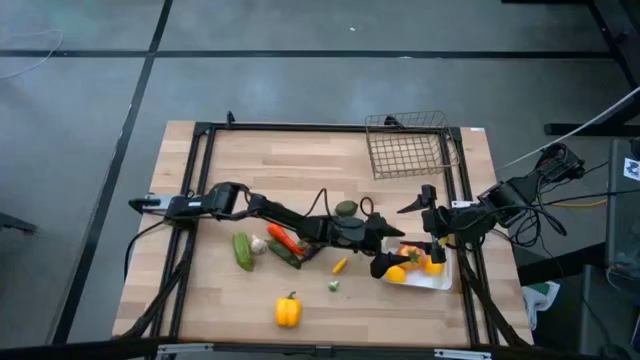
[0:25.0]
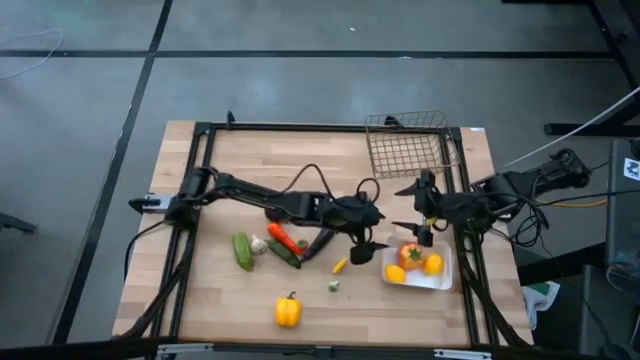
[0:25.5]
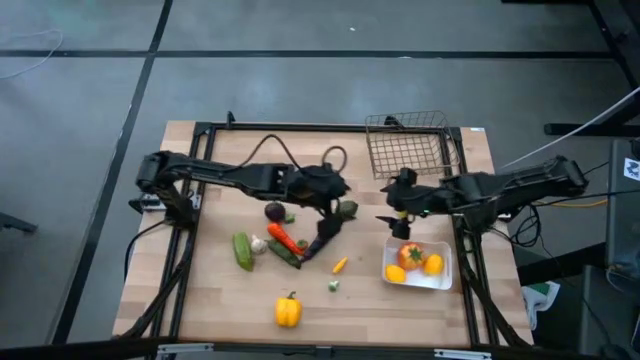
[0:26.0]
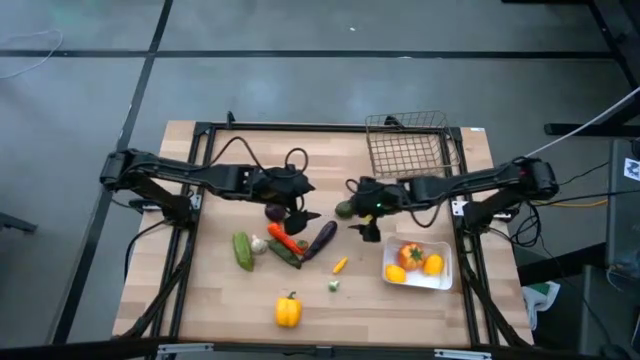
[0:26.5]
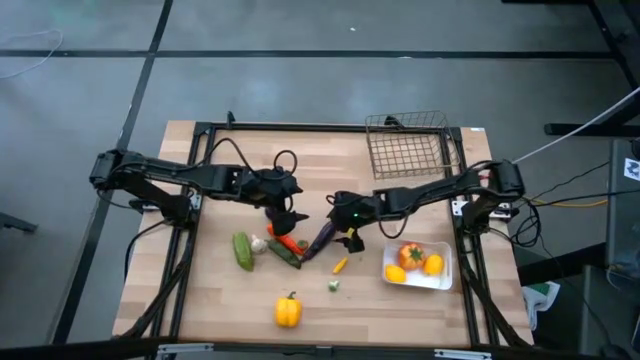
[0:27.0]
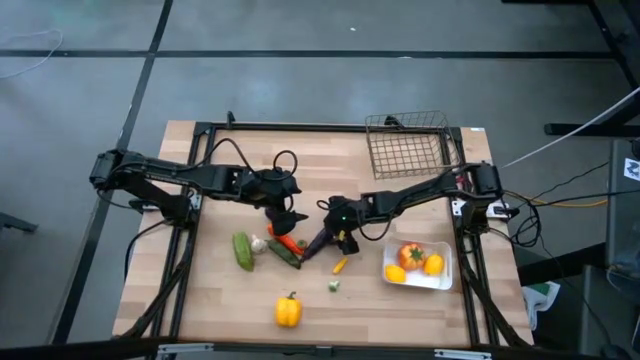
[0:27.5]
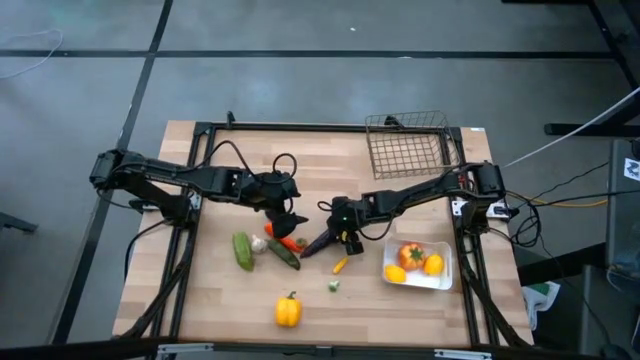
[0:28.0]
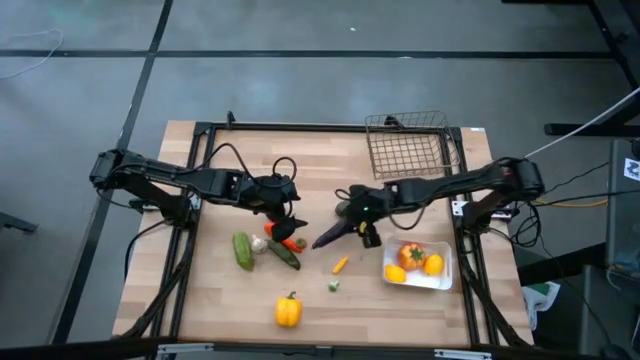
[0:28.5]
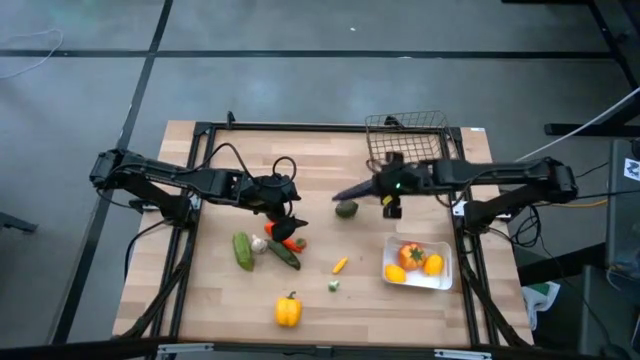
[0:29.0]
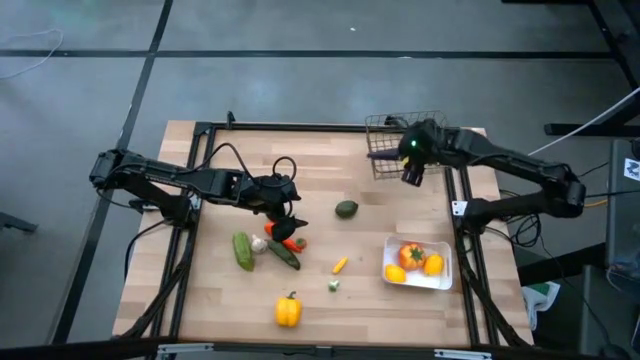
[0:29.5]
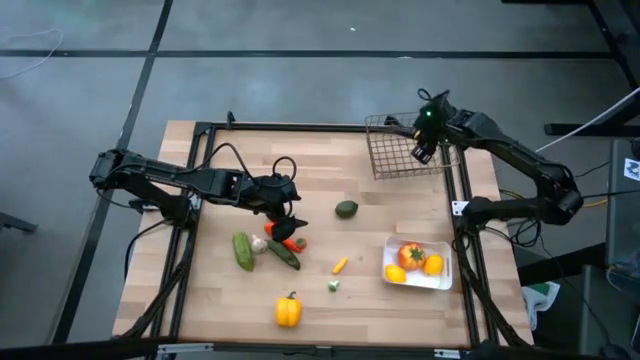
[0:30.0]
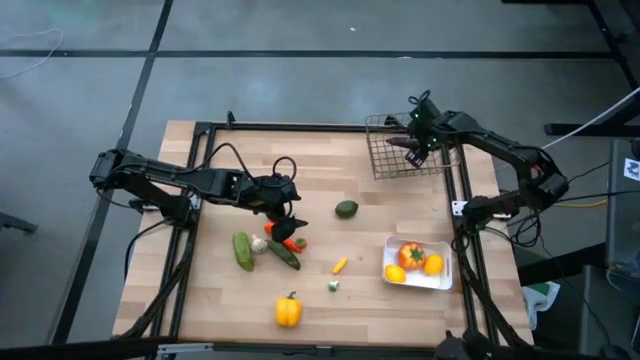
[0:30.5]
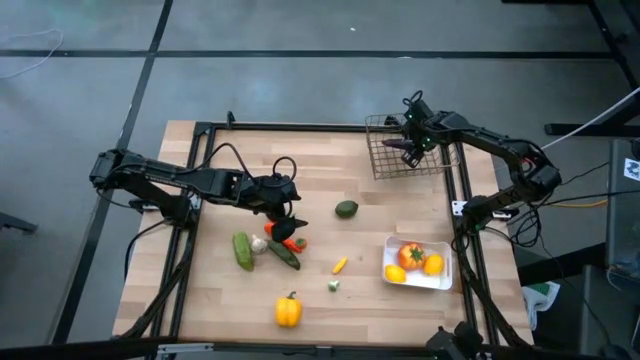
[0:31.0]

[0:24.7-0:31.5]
Task: Sort produce into baskets
Put the violet eggplant into the black wire basket

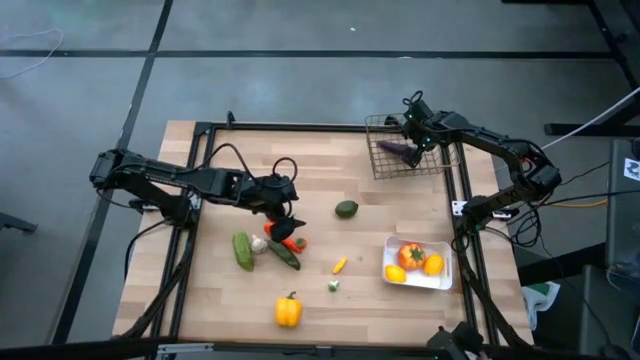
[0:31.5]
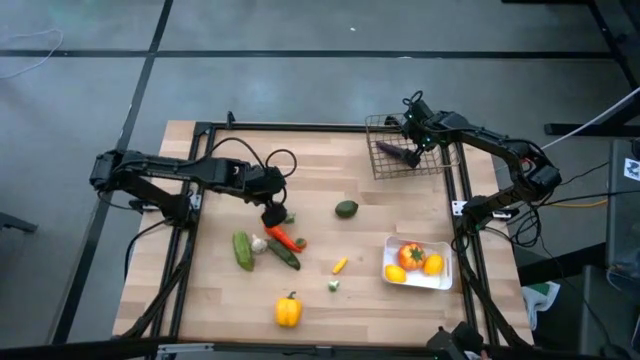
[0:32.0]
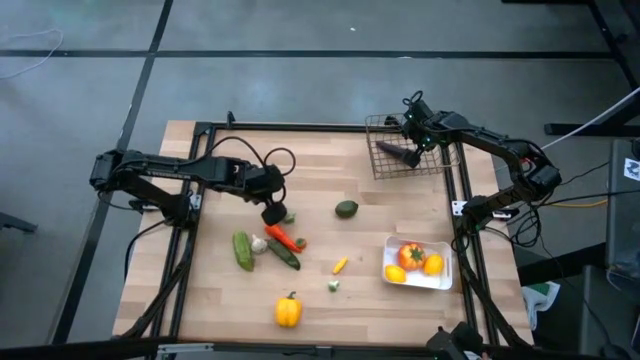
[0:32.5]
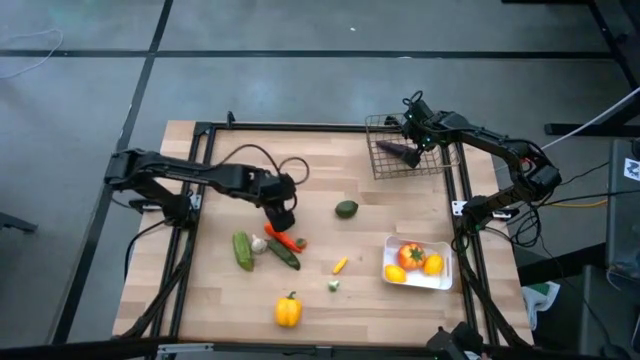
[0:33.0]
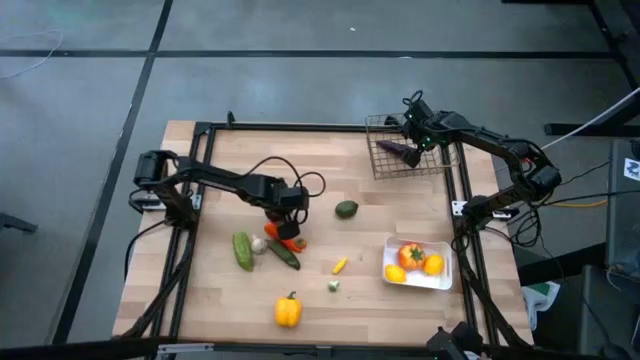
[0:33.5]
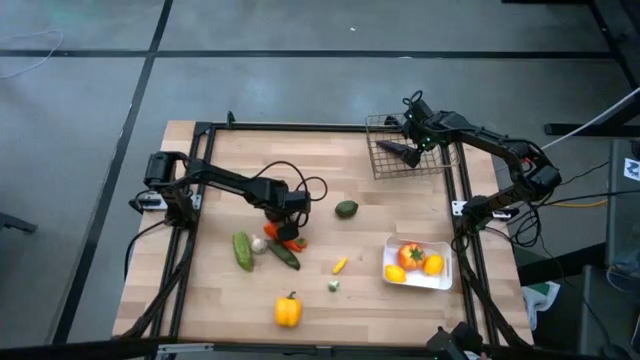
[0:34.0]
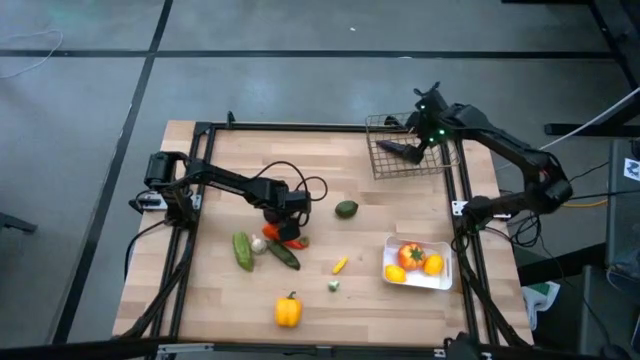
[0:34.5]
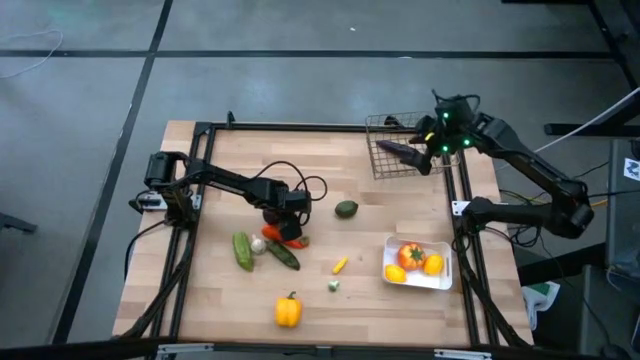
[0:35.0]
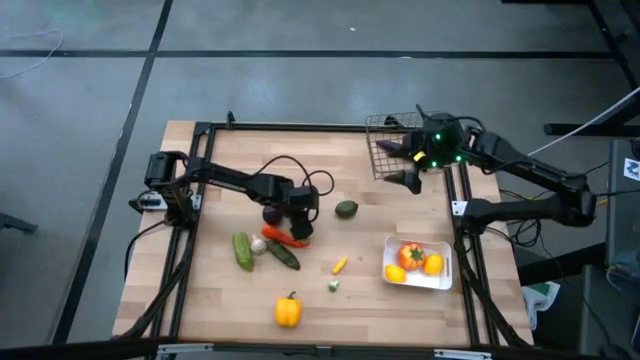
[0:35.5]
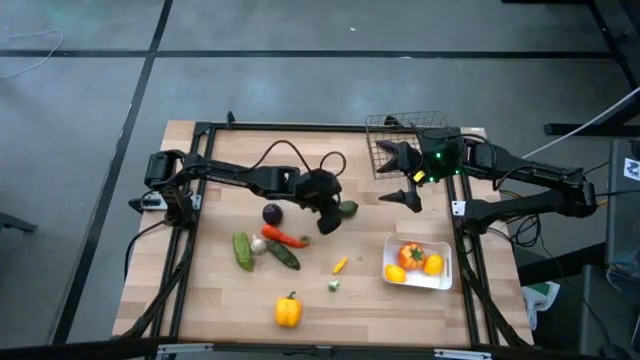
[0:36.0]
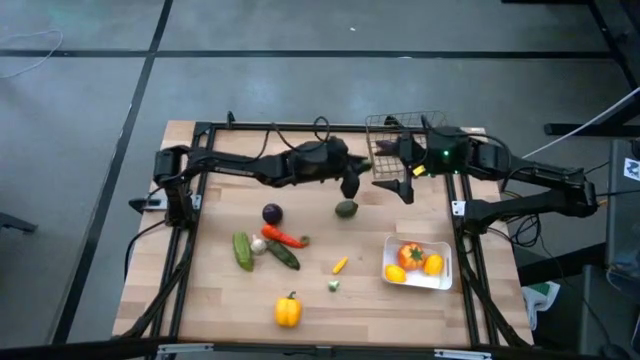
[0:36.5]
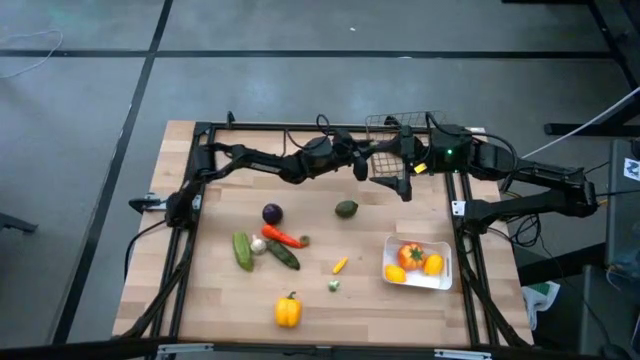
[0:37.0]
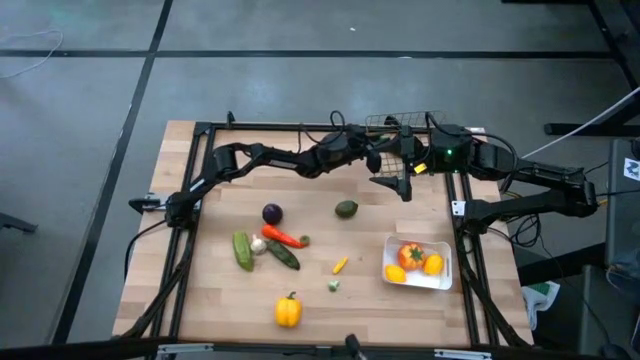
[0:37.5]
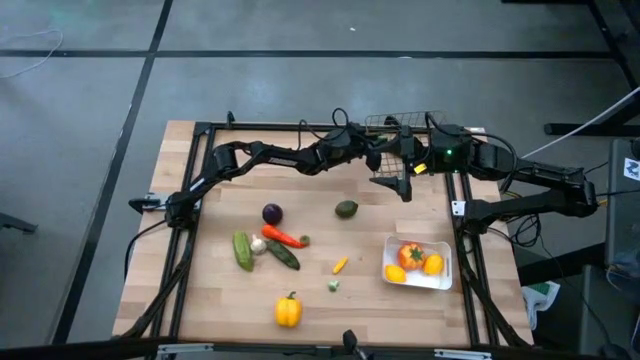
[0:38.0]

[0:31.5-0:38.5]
Put the top green chili pepper into the black wire basket

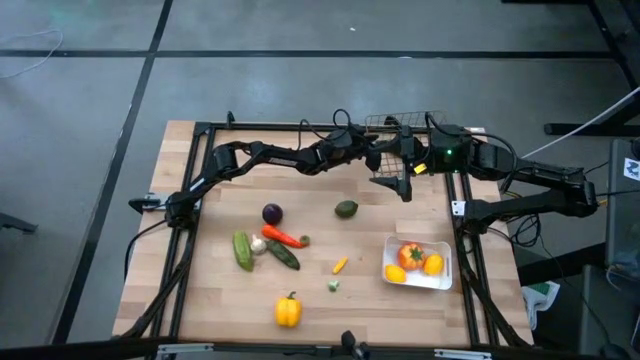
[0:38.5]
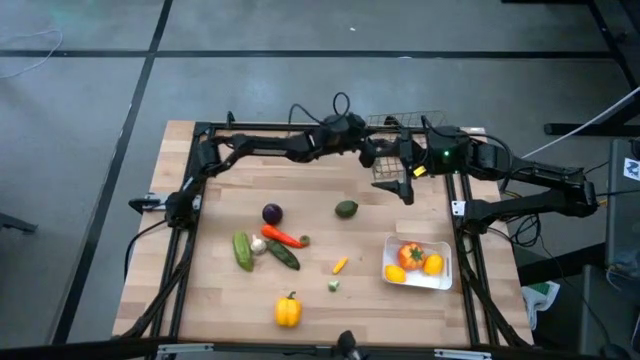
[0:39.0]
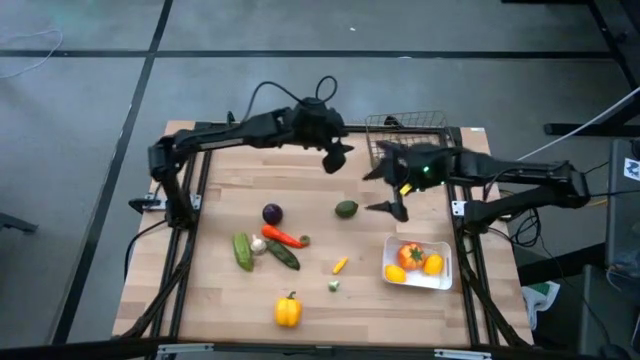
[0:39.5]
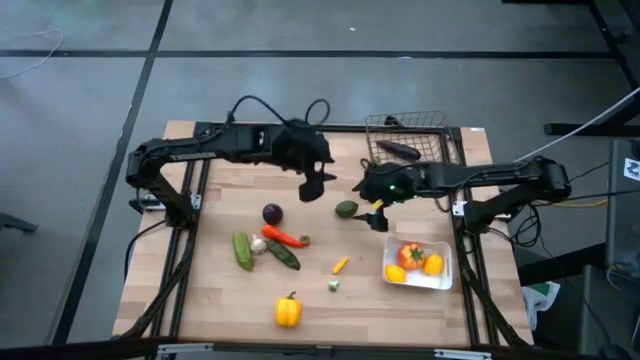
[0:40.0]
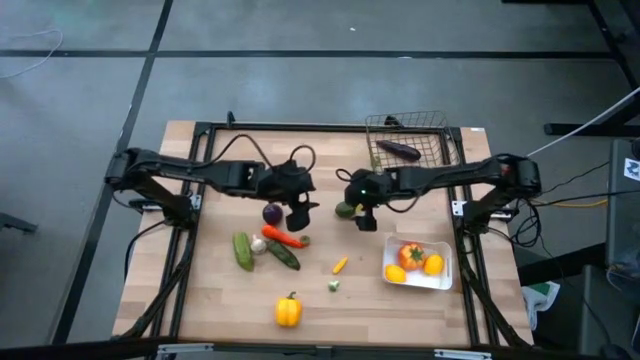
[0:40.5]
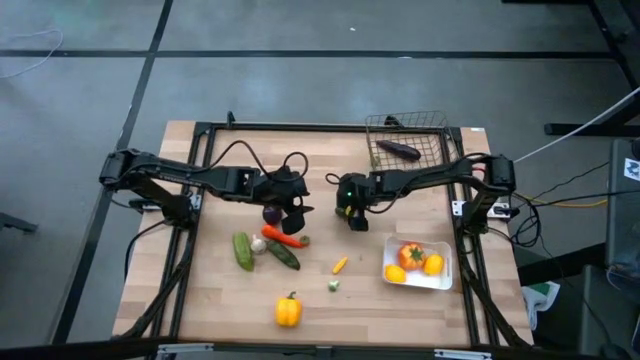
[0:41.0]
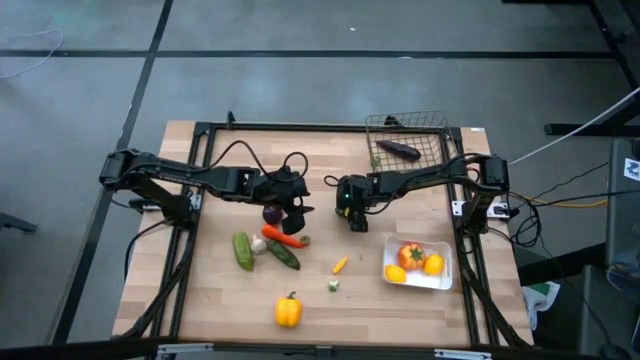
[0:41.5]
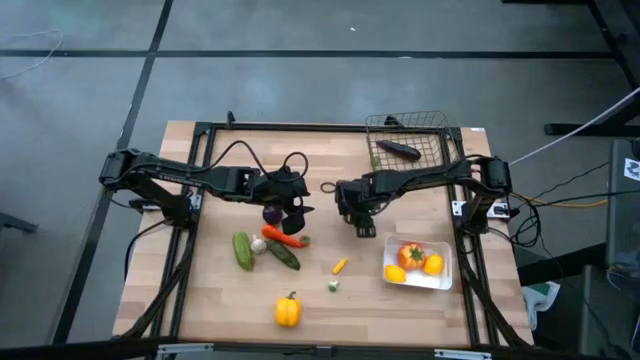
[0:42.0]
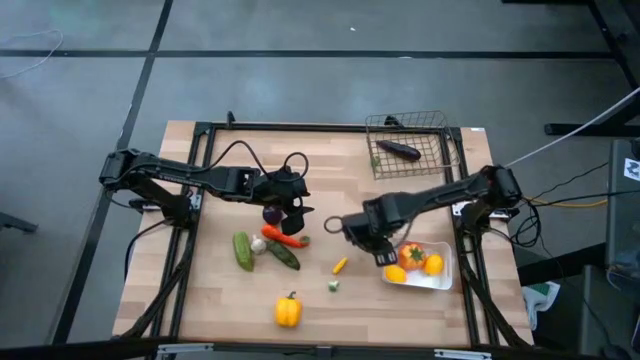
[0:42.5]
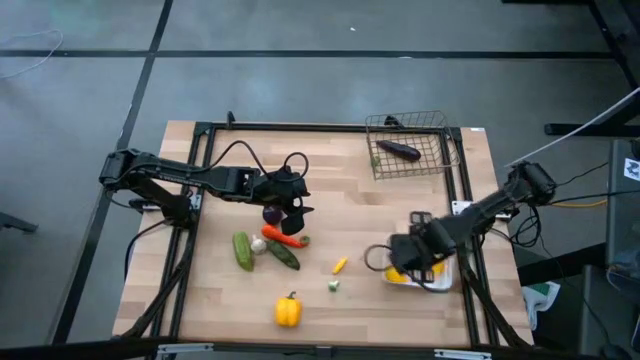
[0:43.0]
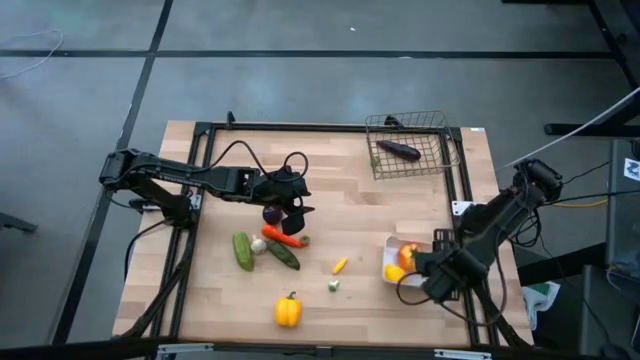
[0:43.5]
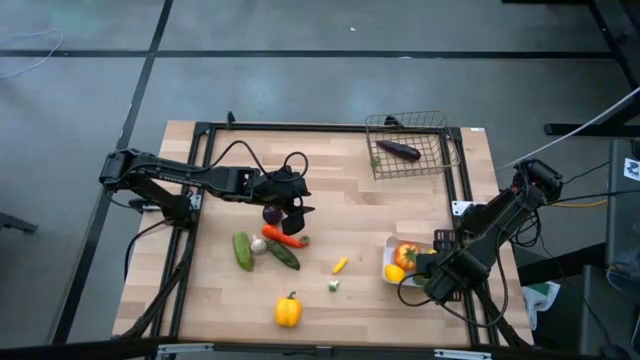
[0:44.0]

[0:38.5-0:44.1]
Put the green lime into the white bin

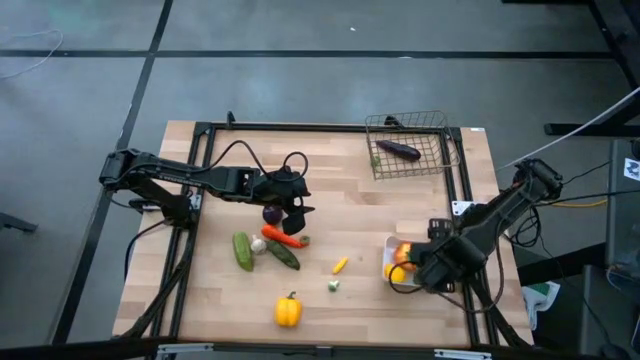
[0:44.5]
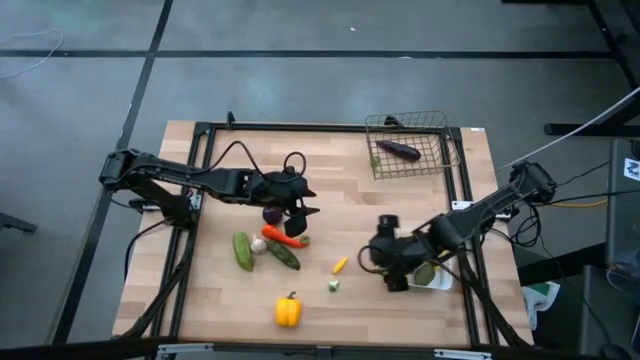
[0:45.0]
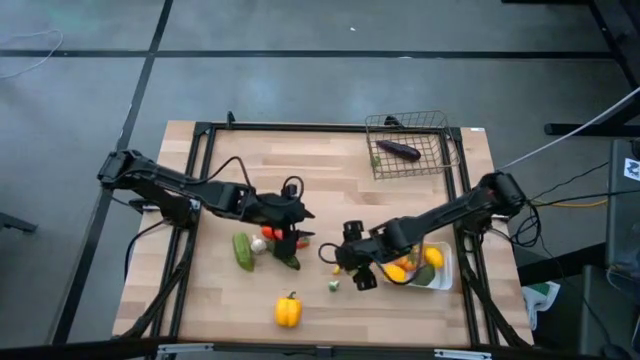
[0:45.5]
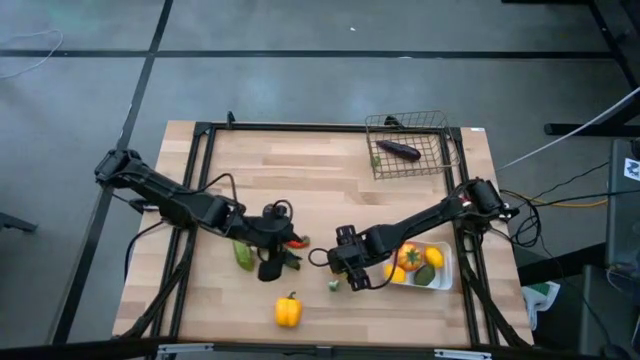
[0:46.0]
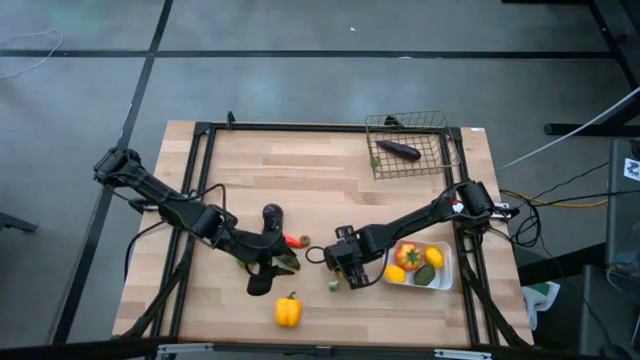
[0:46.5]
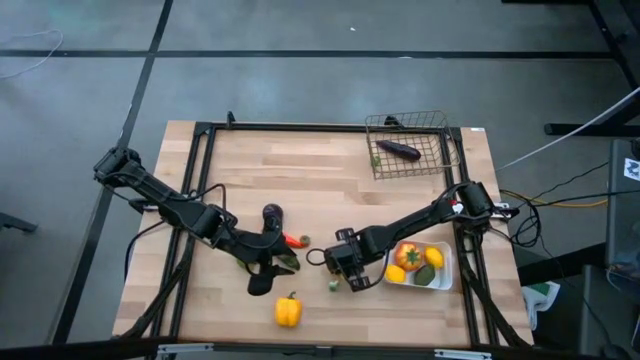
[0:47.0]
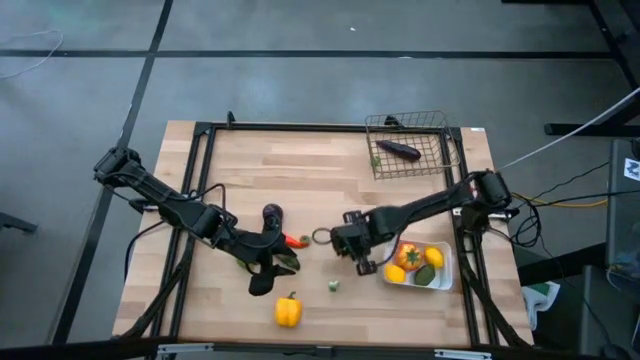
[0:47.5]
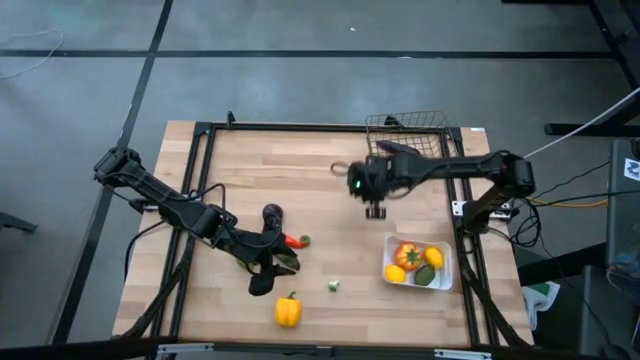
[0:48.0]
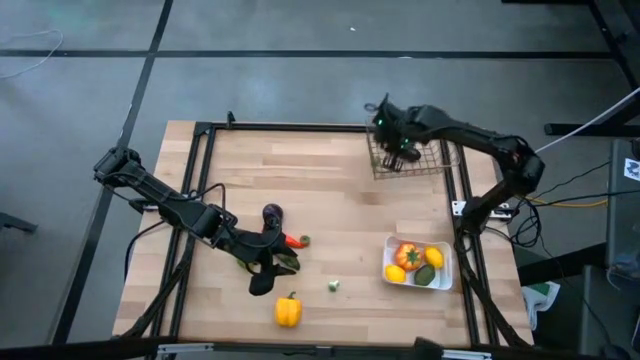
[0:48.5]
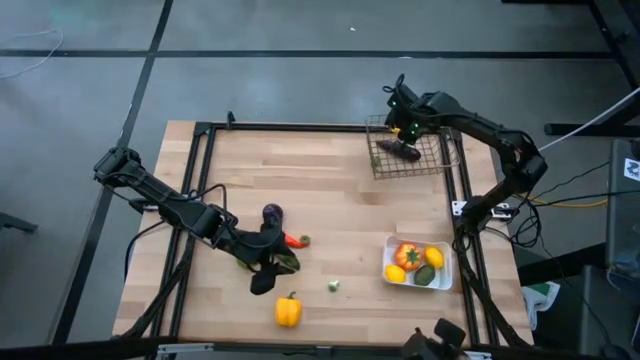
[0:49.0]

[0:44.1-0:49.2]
Put the yellow corn into the black wire basket
